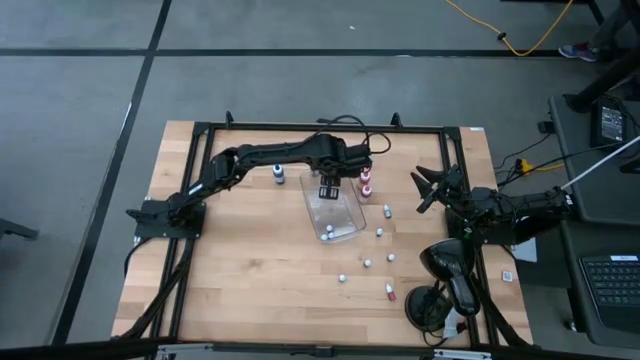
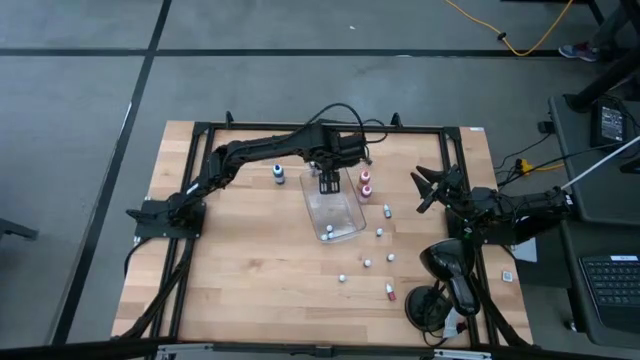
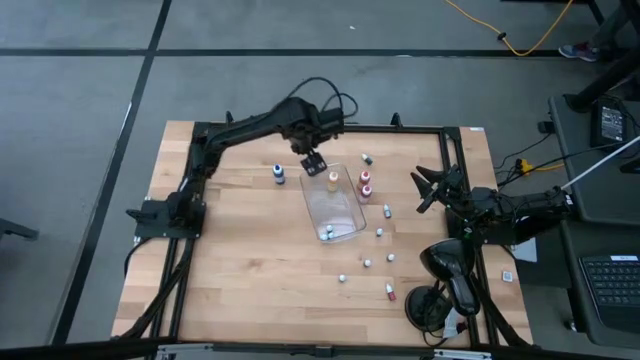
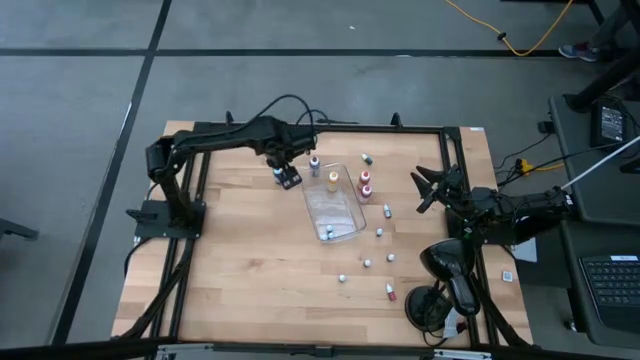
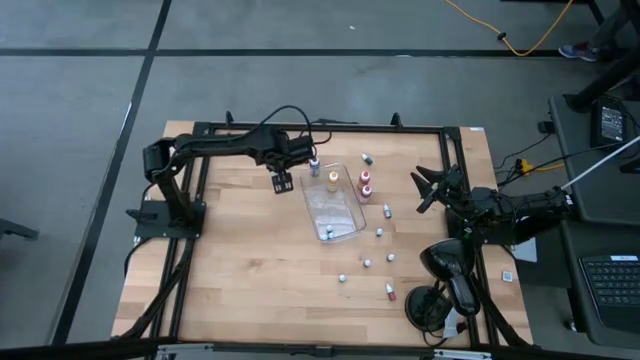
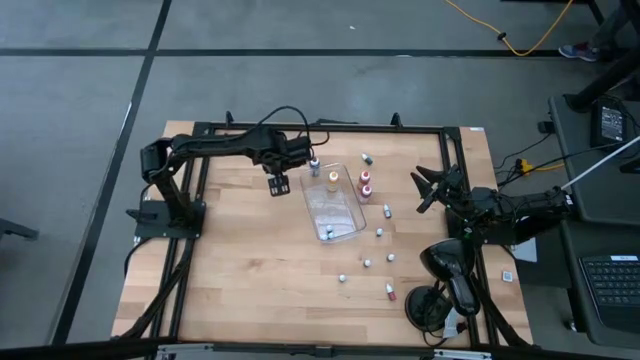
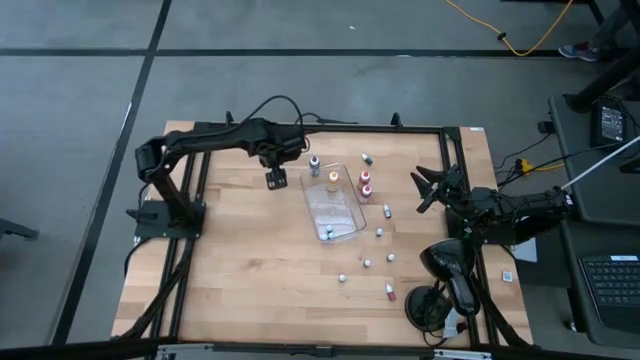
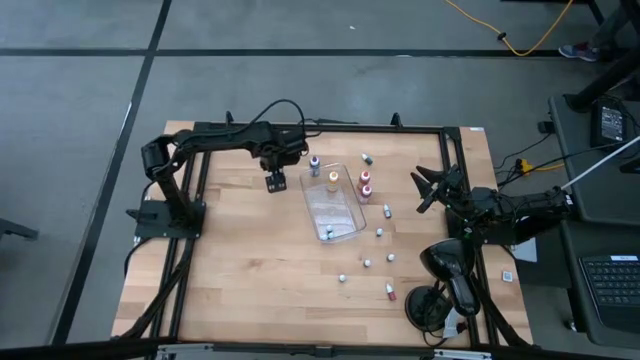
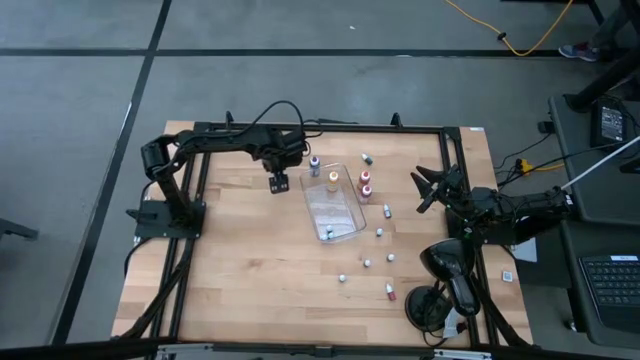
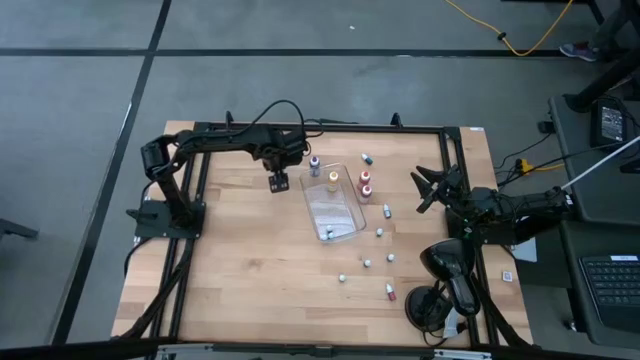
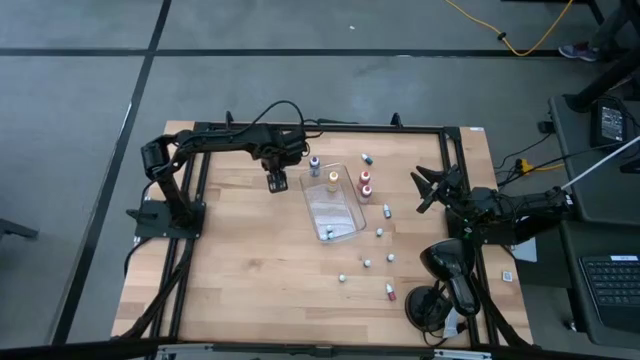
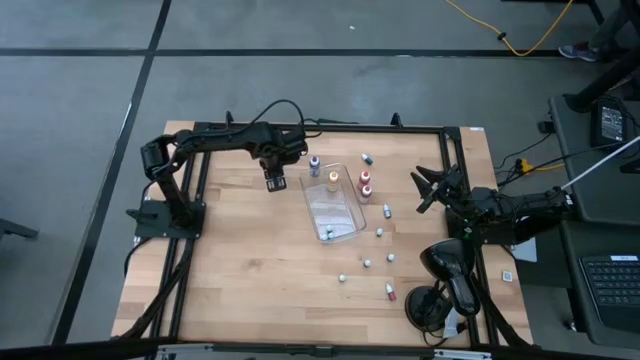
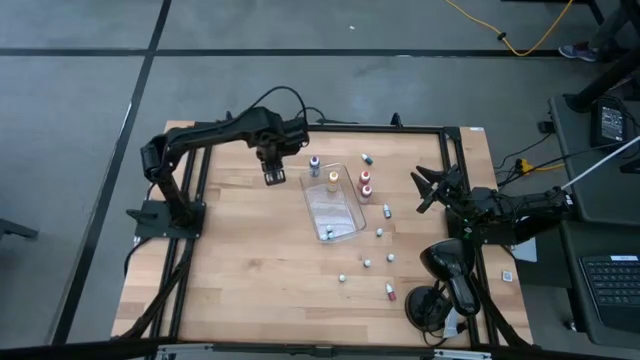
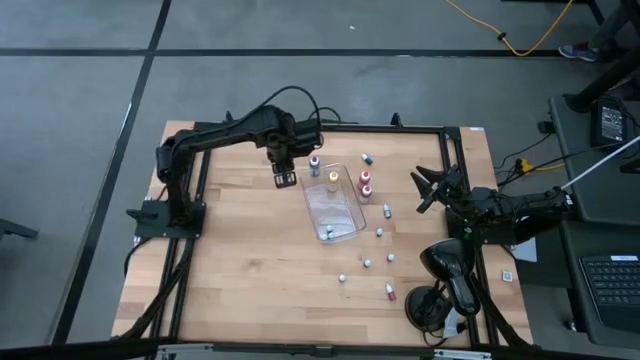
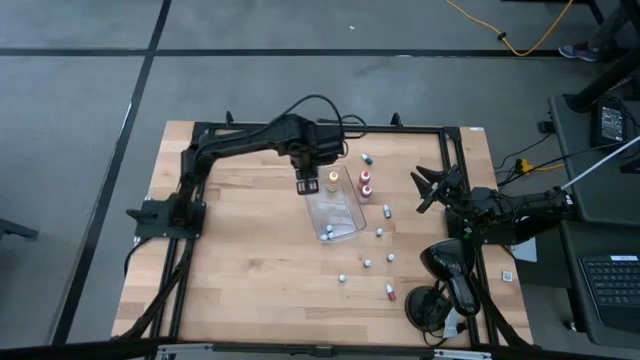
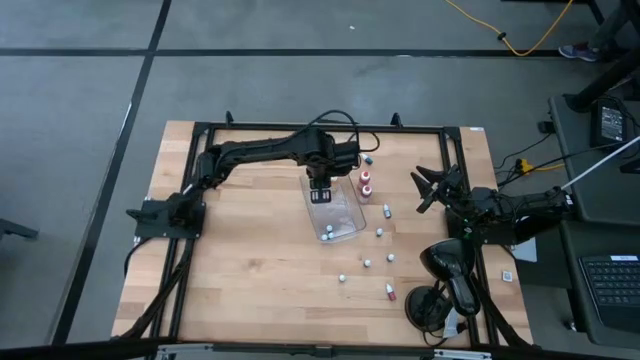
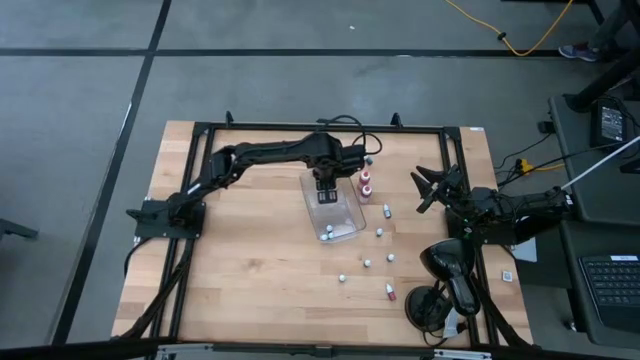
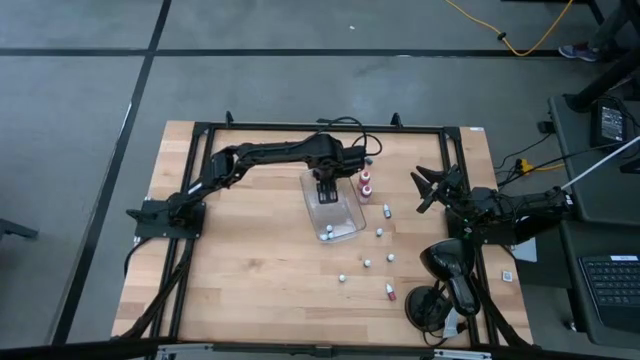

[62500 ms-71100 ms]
Task: Pick & Place food coloring
Put the large blue food coloring bottle into the top of the bin

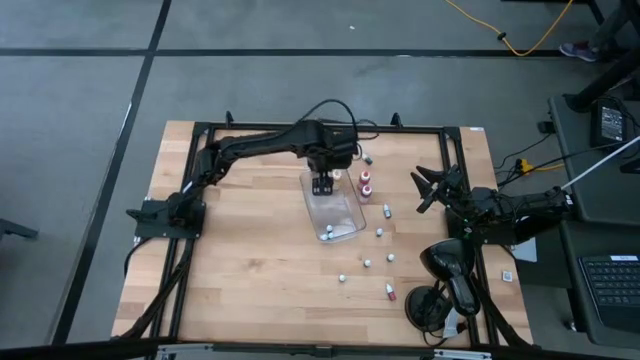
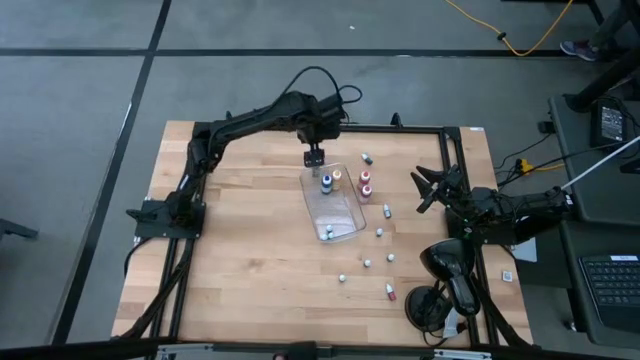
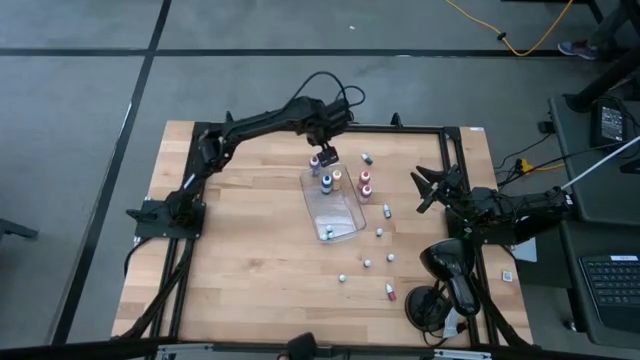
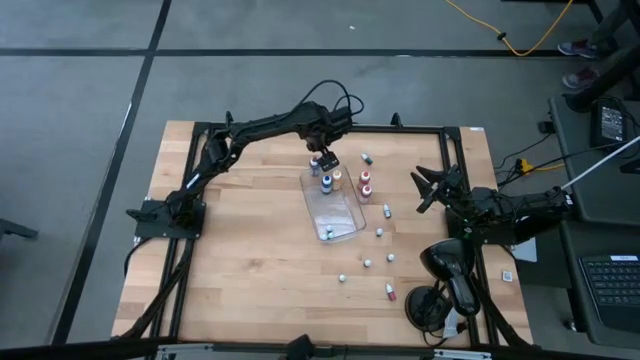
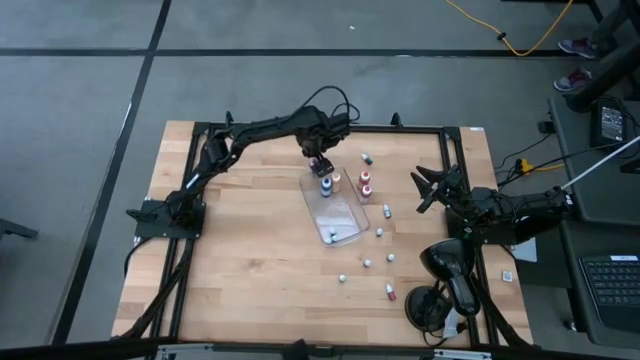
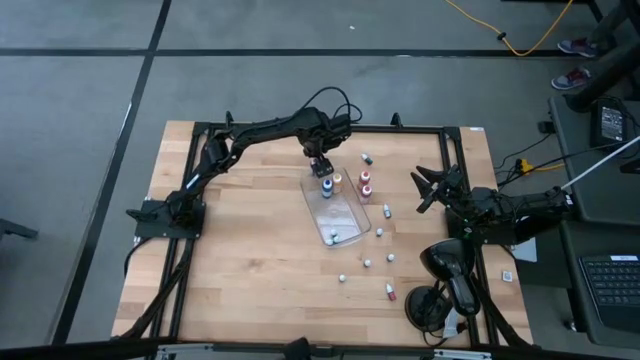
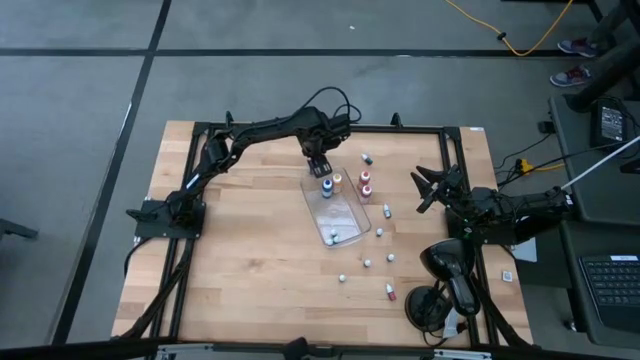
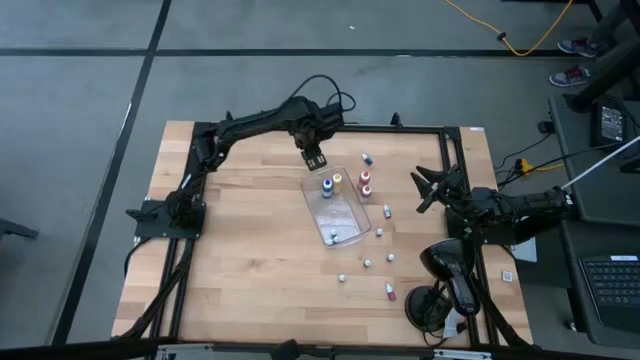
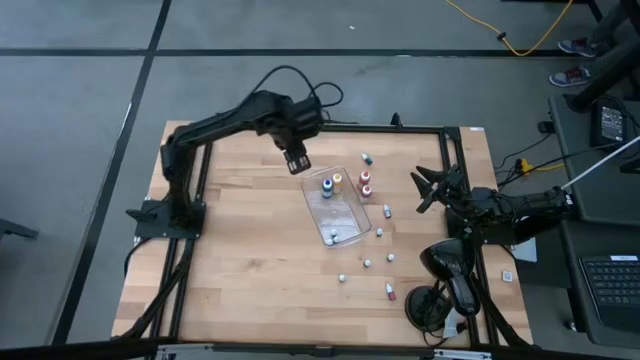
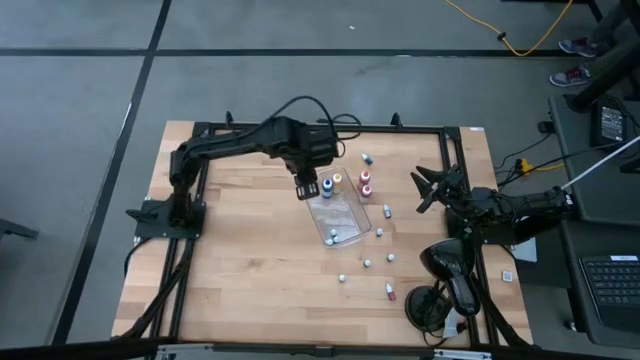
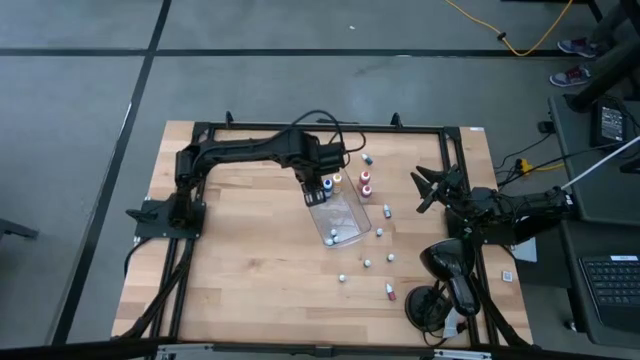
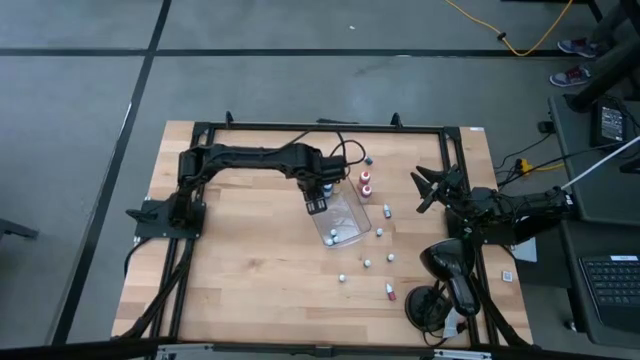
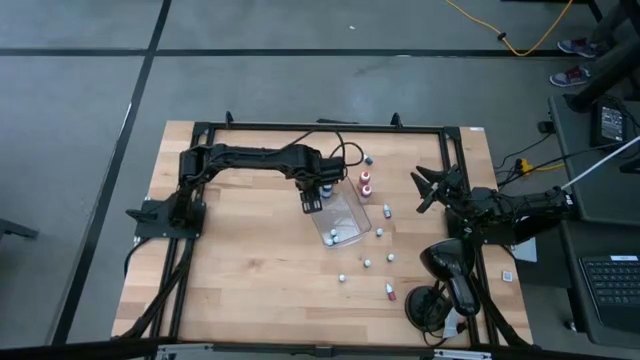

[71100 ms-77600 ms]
Put the large purple food coloring bottle into the top of the bin

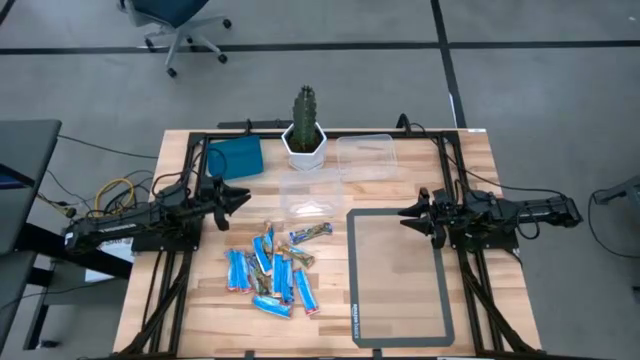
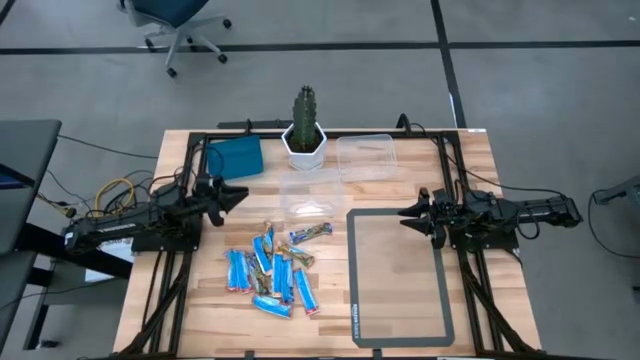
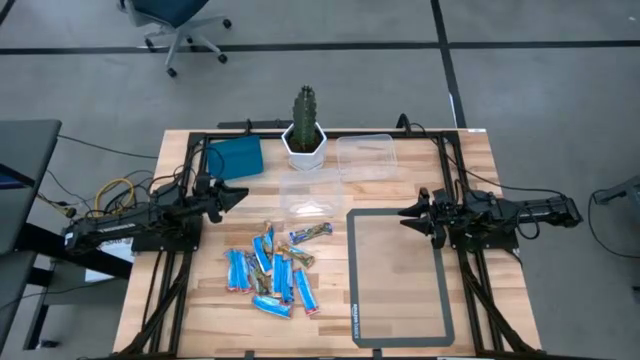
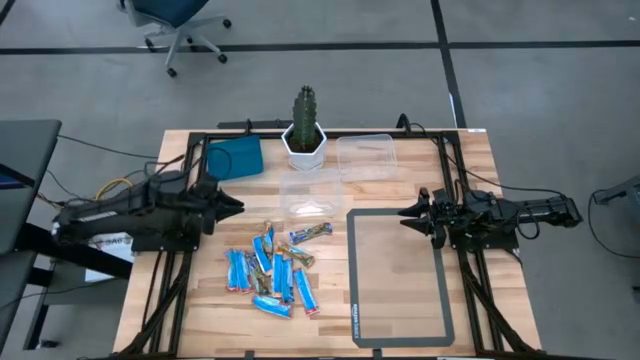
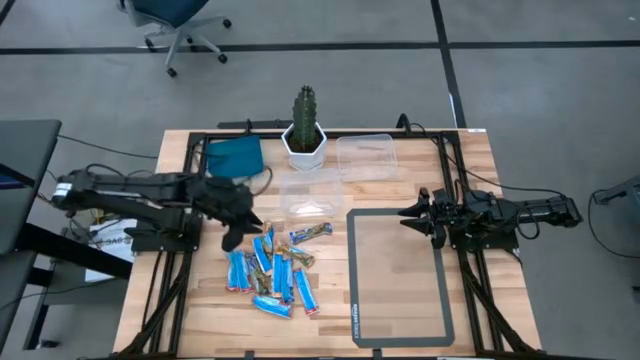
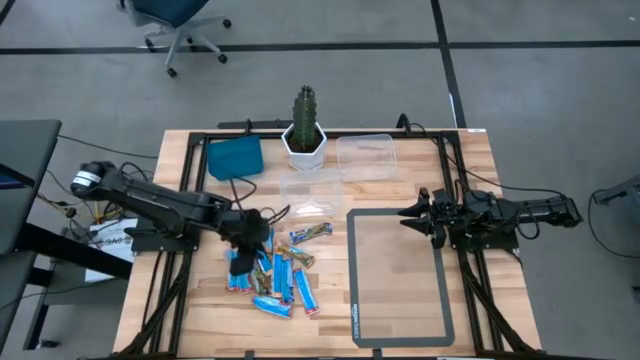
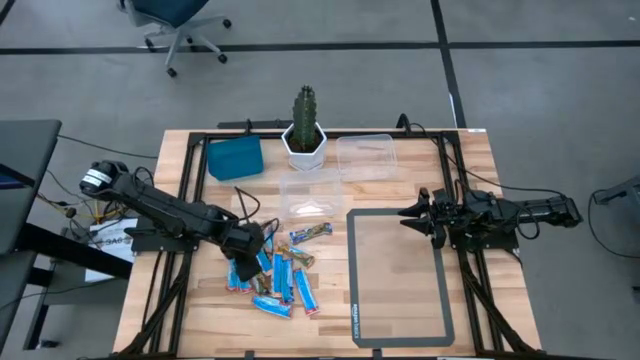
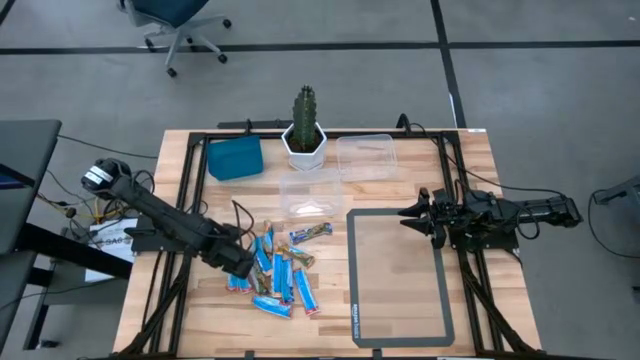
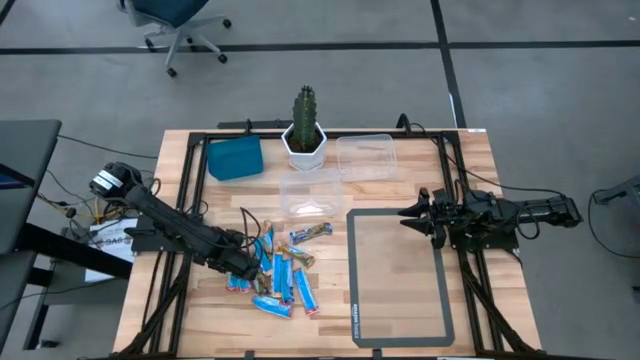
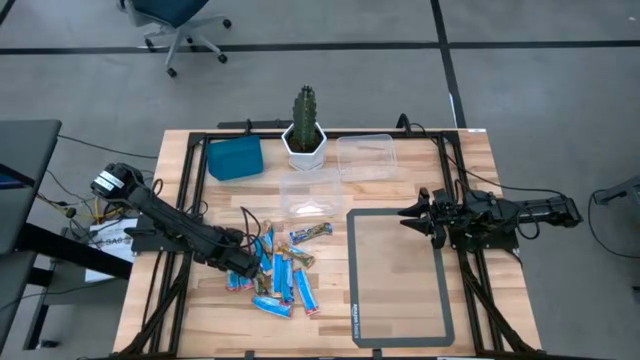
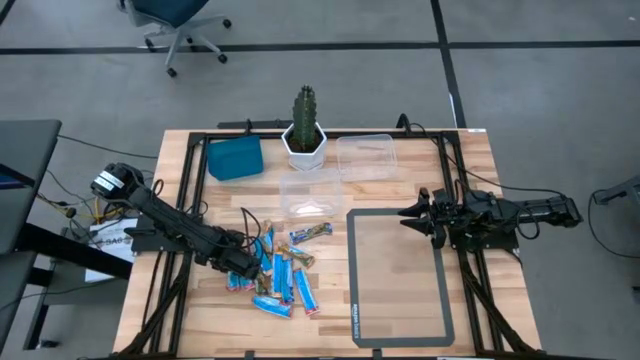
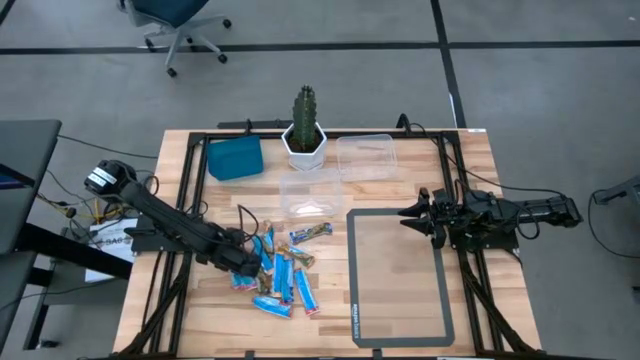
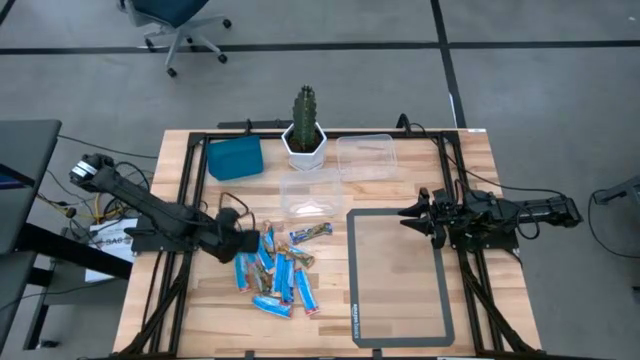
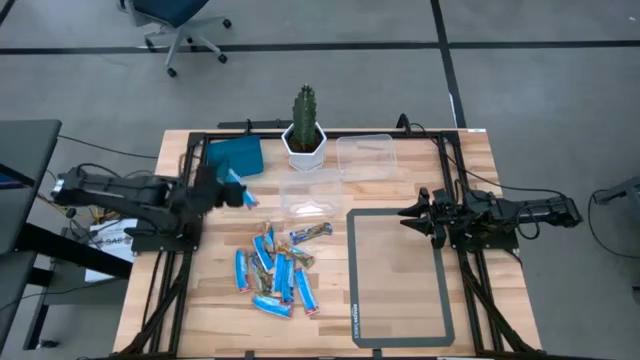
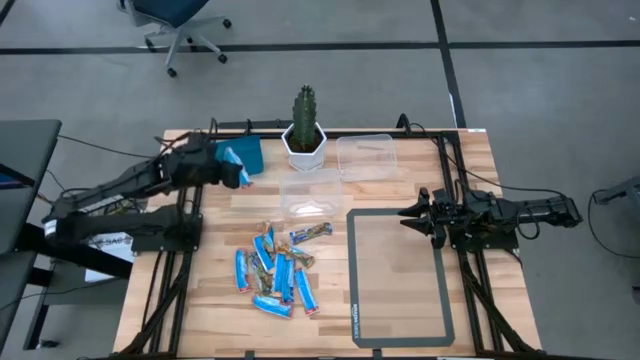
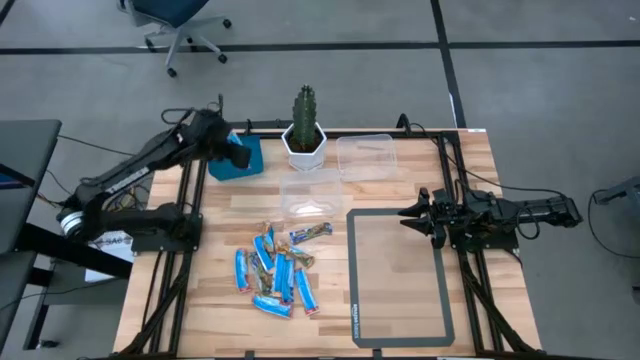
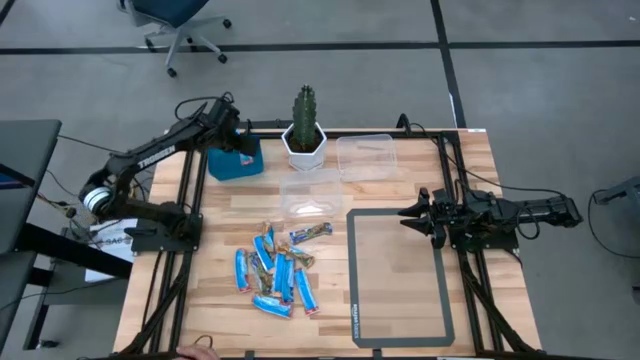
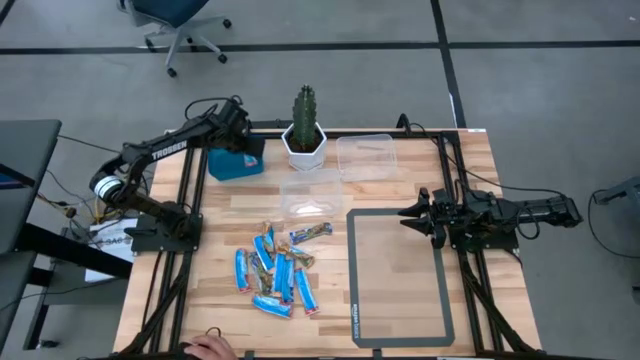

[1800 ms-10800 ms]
Task: Pick and place Granola Bars by type
Put the red granola bar into the blue bin
